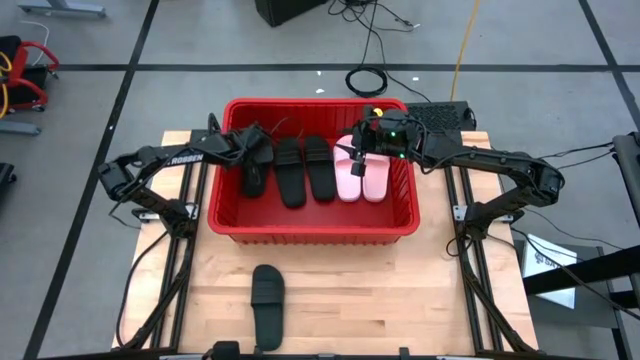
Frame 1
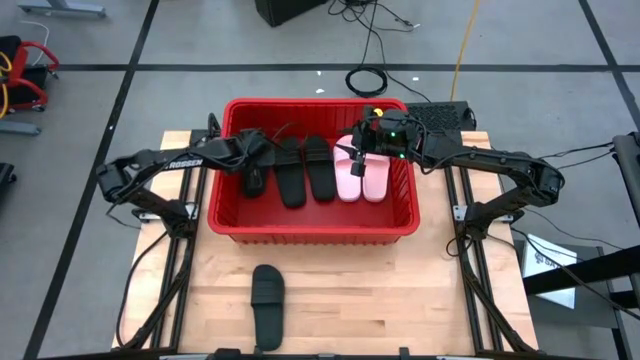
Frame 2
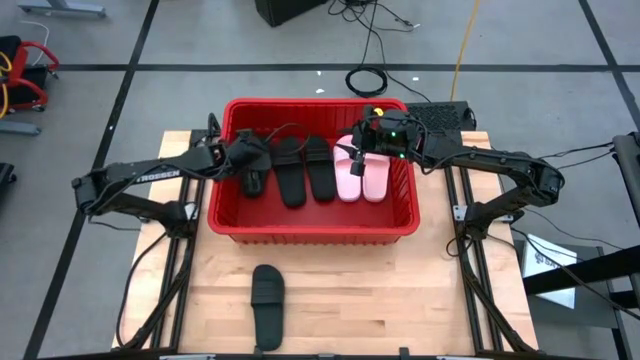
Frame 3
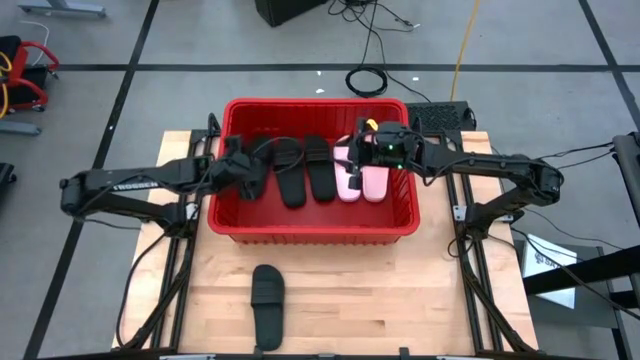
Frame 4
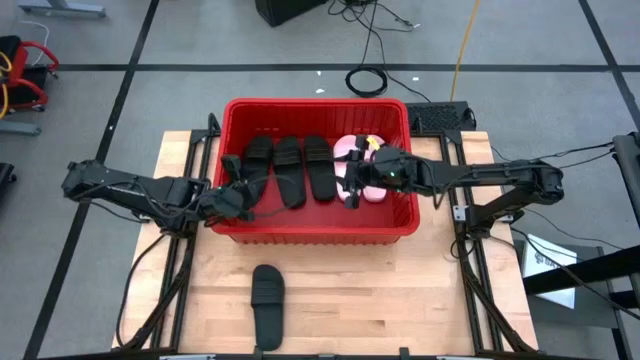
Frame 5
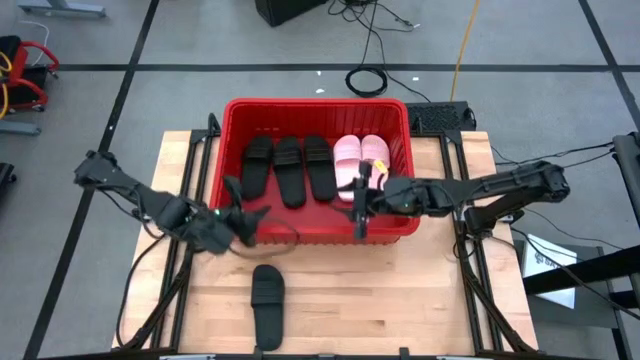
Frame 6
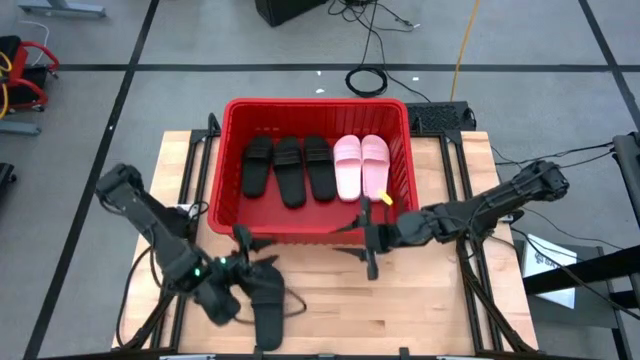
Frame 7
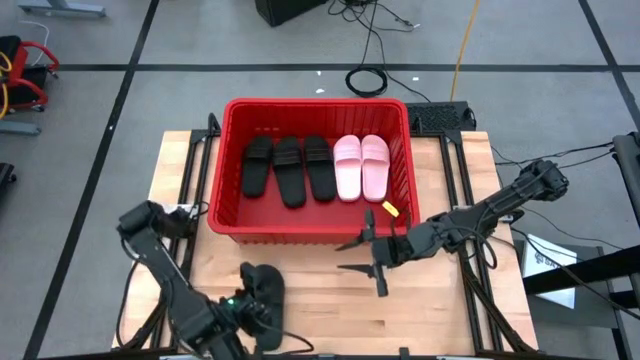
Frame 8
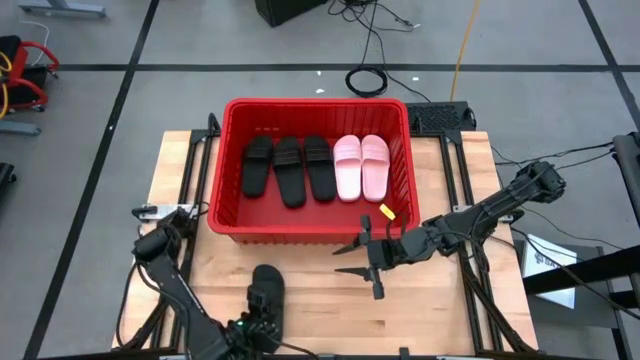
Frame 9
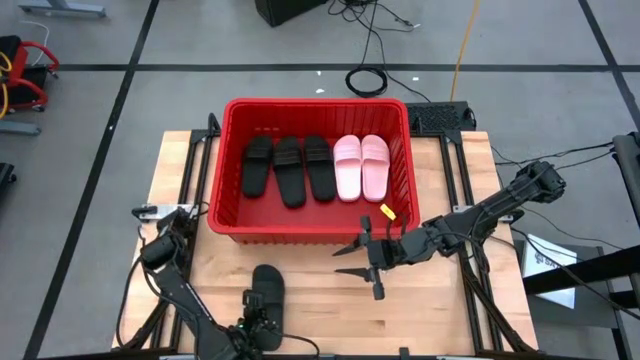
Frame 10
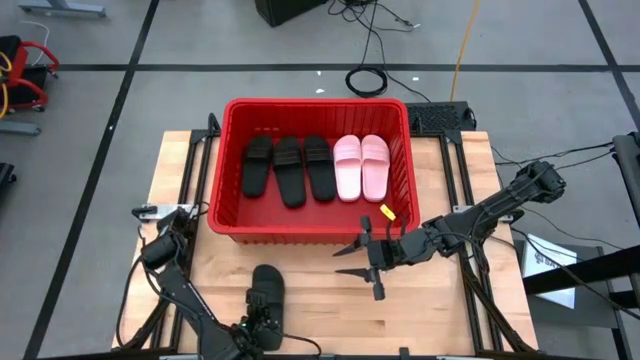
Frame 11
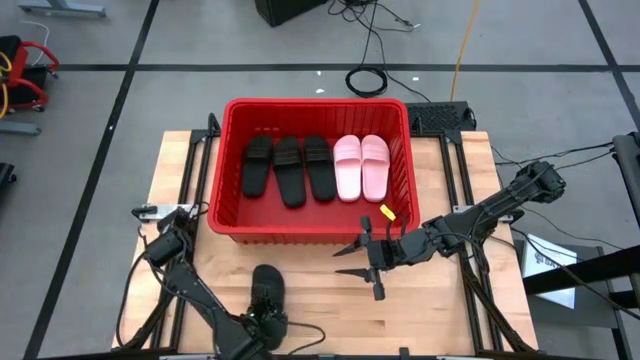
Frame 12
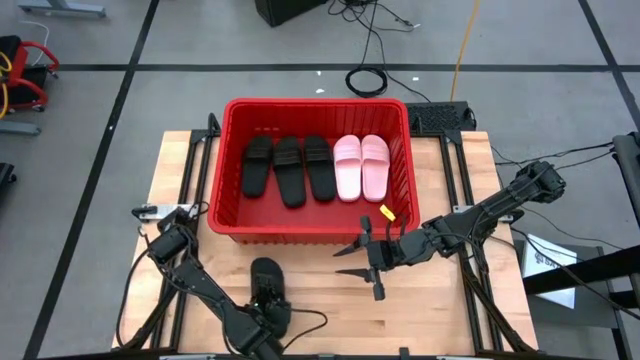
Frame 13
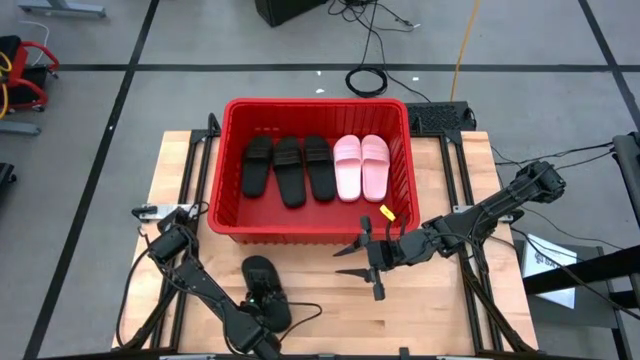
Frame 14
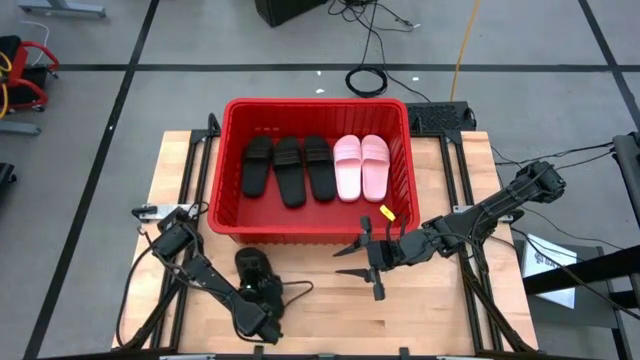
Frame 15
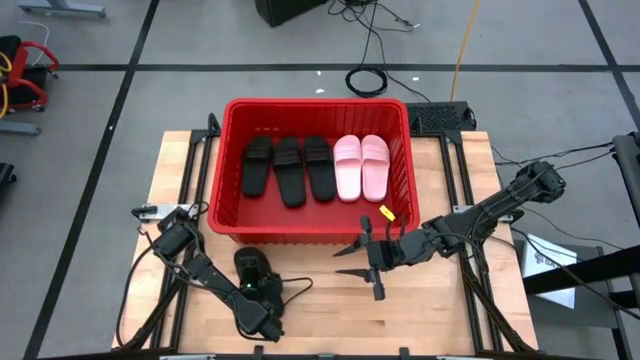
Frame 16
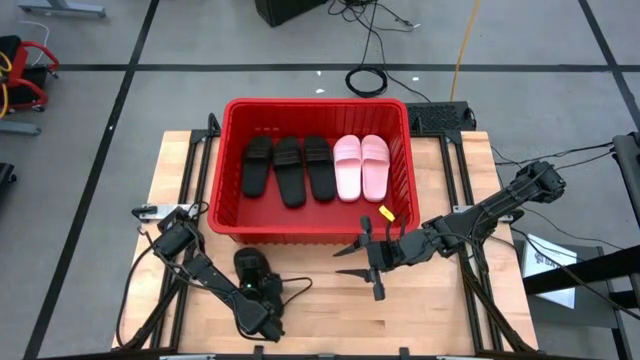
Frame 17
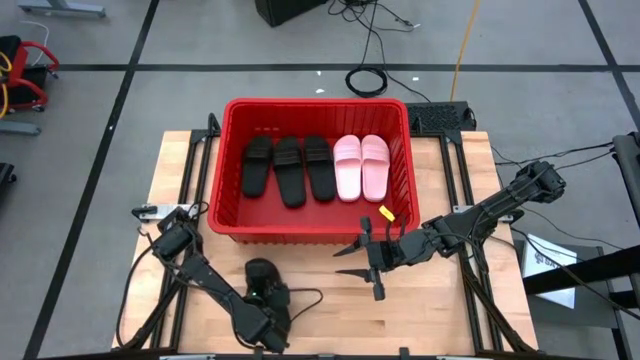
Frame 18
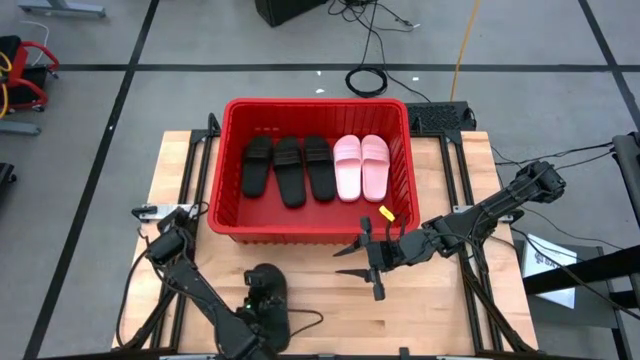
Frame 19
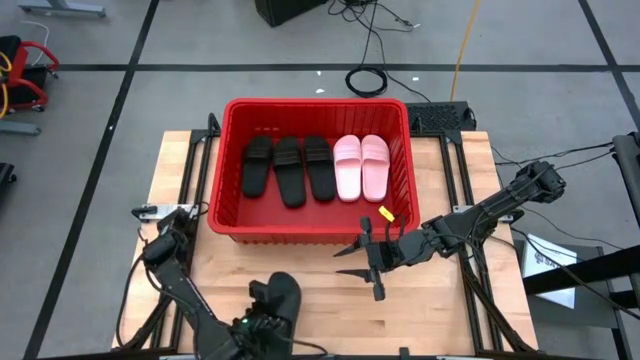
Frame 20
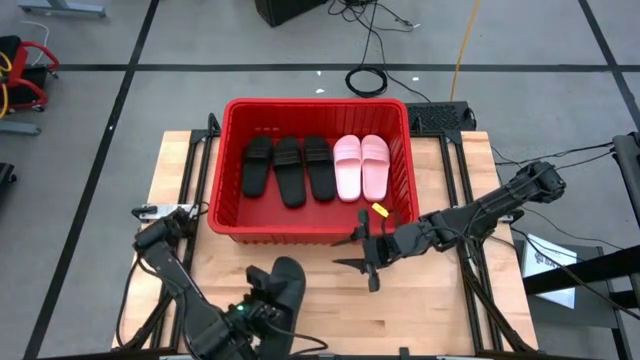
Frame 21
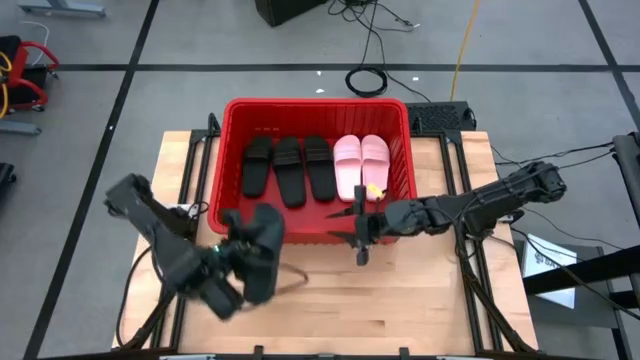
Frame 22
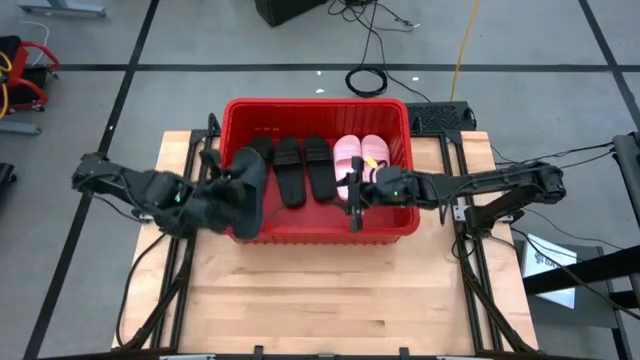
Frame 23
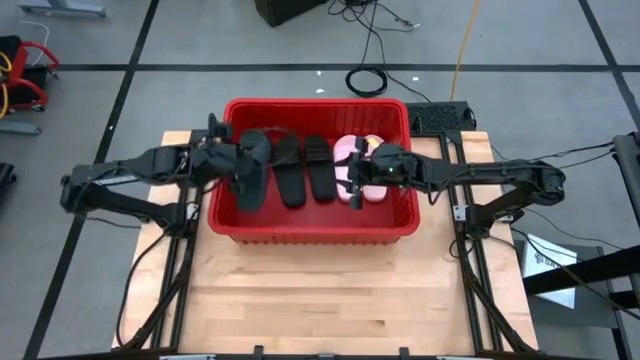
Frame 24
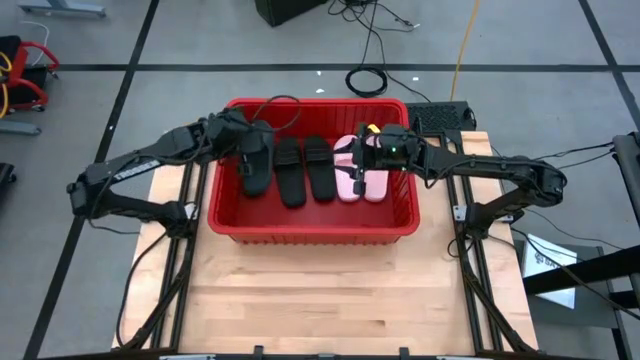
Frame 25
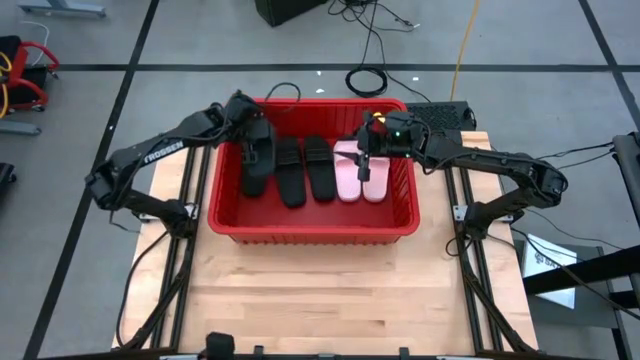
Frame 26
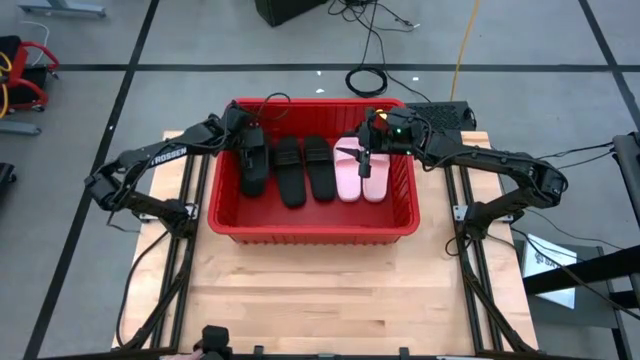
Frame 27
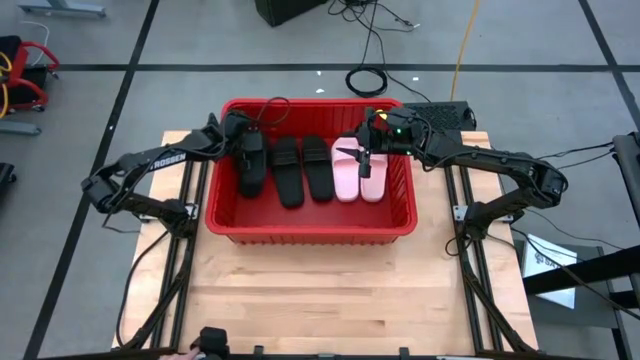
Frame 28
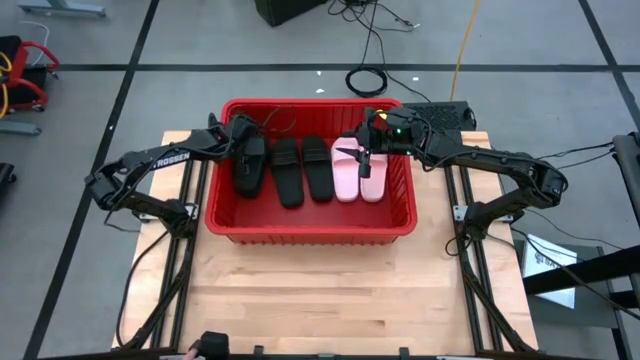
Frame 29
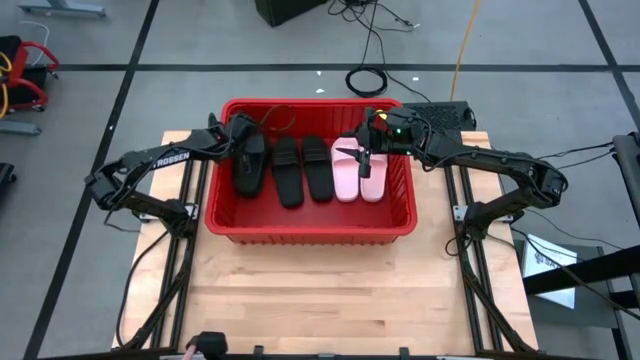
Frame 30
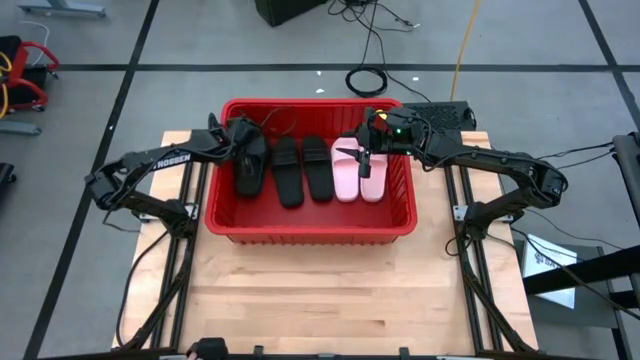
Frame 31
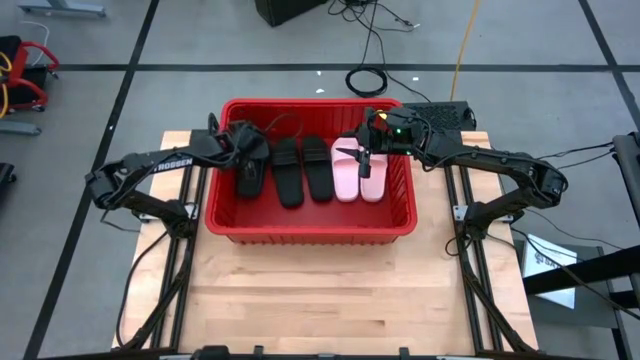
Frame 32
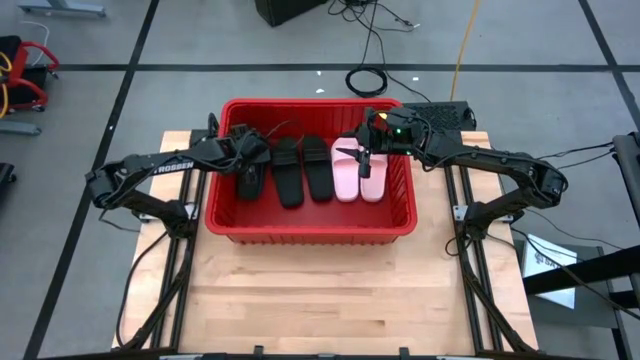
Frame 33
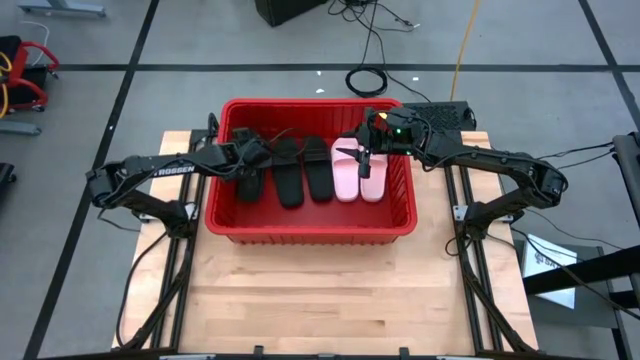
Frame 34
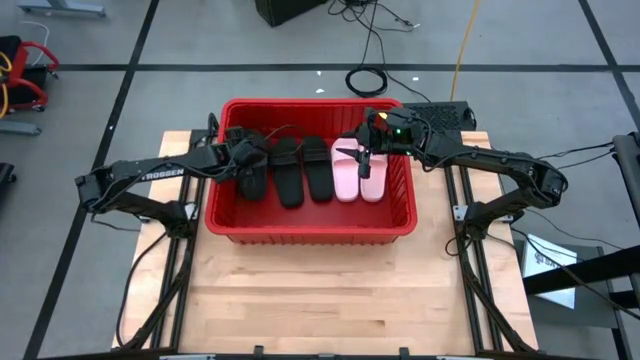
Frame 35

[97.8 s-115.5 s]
Task: Pick and place slides into bin
Put the black slipper on the red bin
